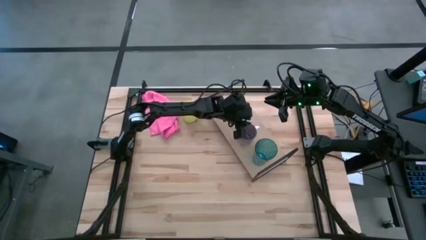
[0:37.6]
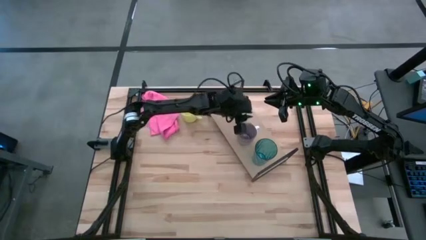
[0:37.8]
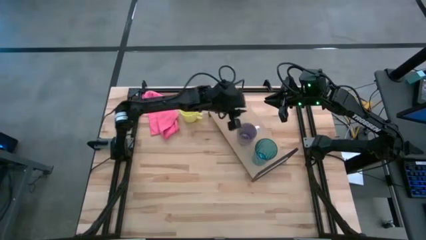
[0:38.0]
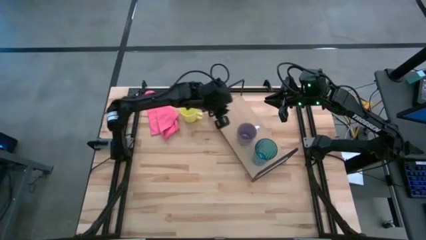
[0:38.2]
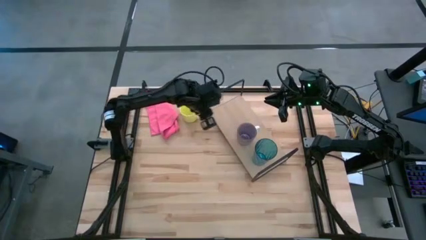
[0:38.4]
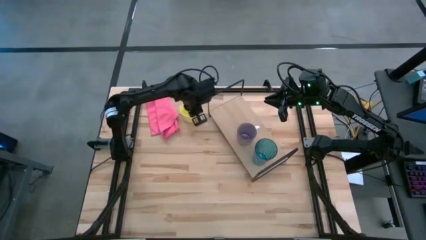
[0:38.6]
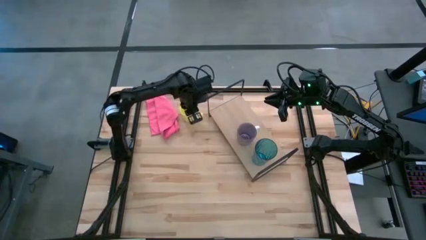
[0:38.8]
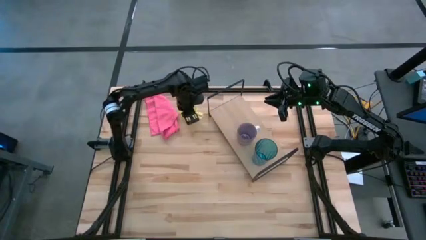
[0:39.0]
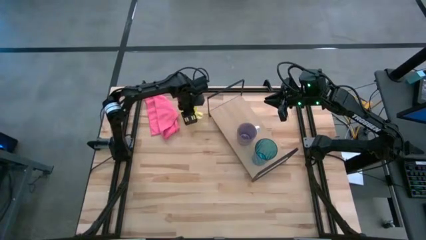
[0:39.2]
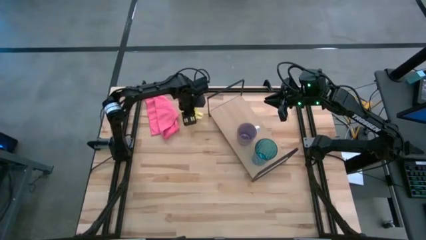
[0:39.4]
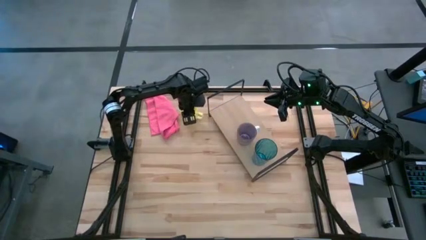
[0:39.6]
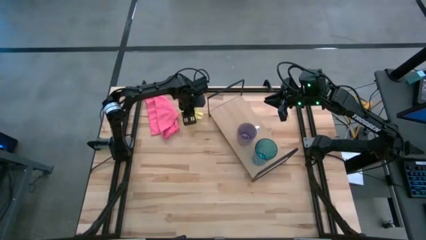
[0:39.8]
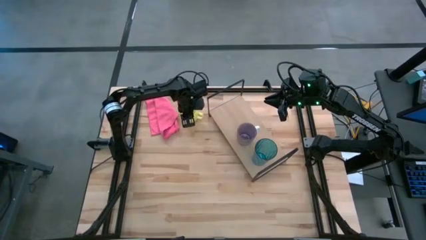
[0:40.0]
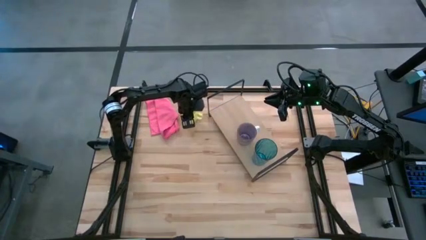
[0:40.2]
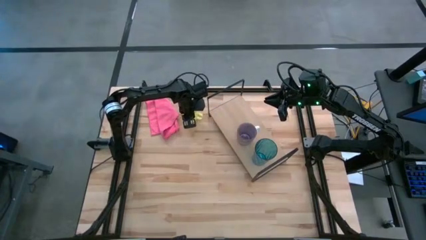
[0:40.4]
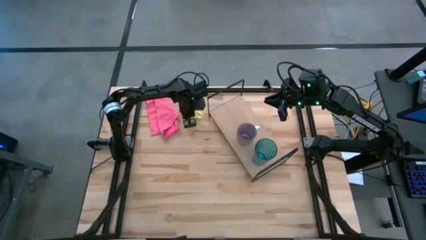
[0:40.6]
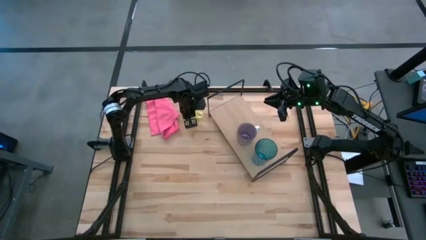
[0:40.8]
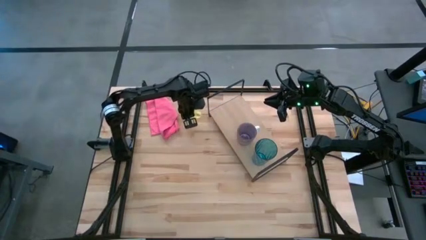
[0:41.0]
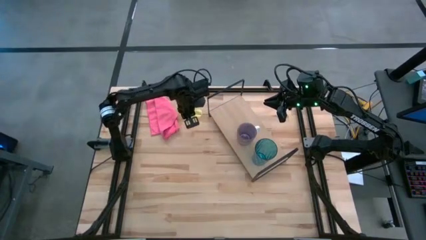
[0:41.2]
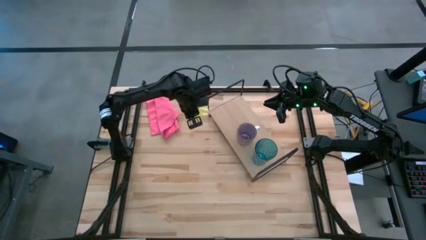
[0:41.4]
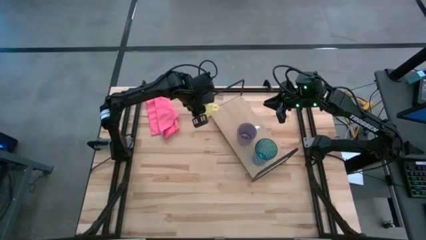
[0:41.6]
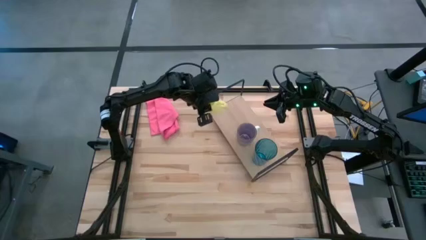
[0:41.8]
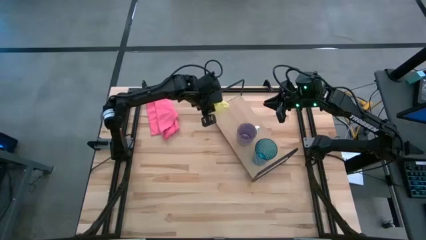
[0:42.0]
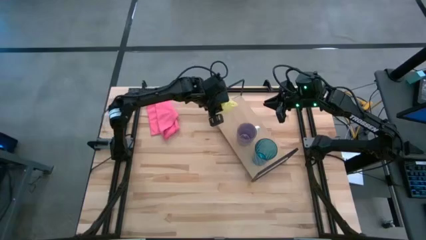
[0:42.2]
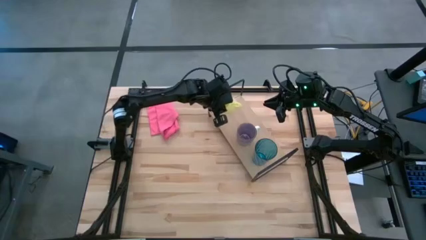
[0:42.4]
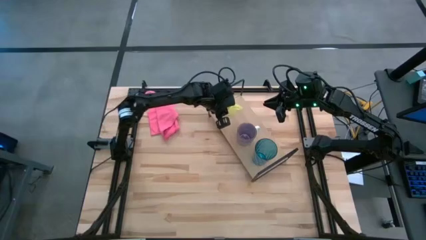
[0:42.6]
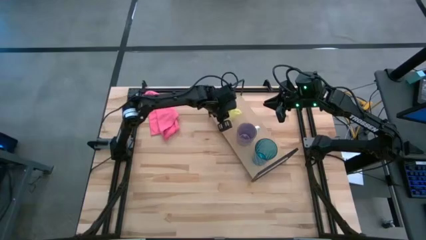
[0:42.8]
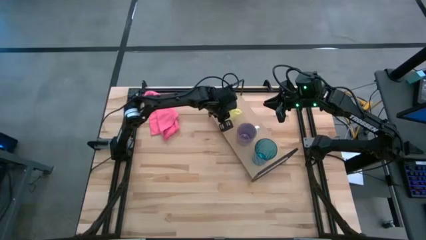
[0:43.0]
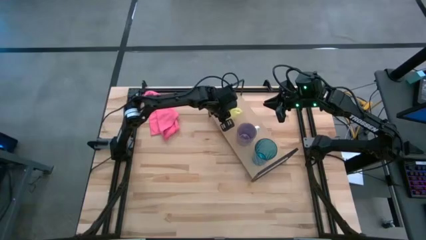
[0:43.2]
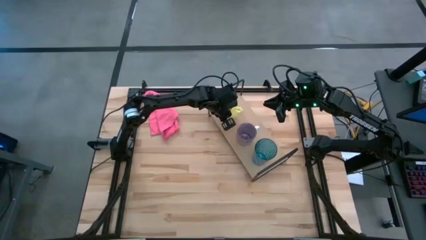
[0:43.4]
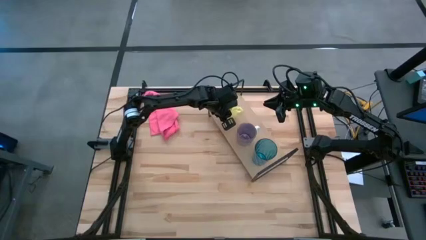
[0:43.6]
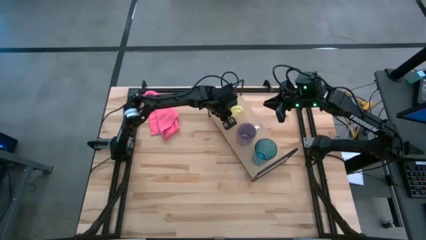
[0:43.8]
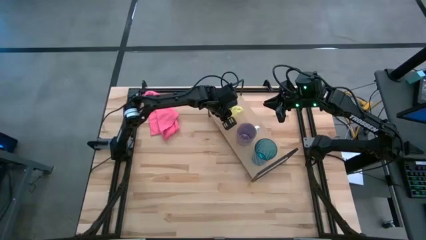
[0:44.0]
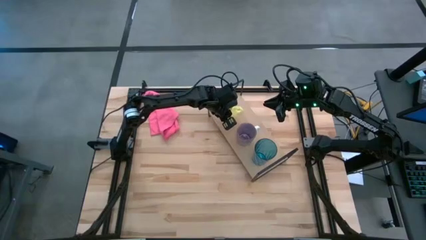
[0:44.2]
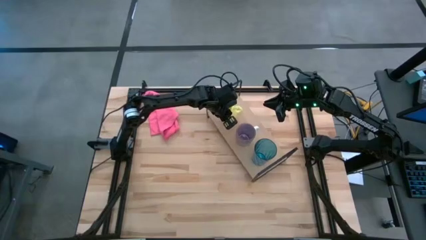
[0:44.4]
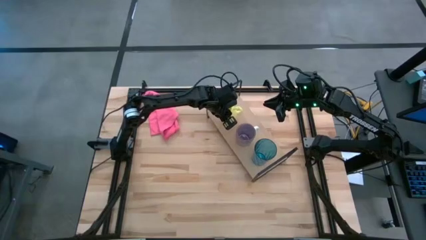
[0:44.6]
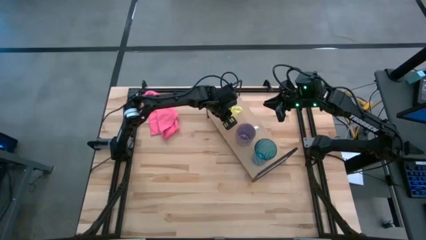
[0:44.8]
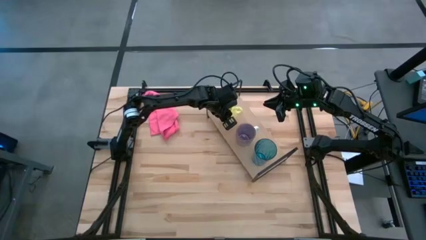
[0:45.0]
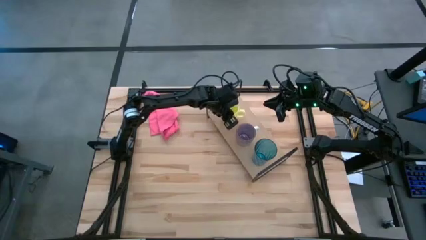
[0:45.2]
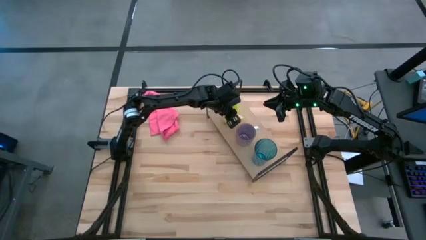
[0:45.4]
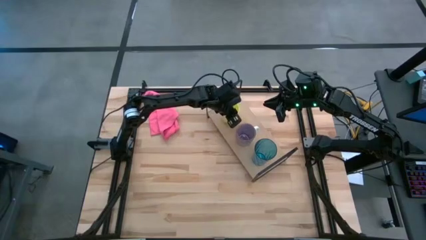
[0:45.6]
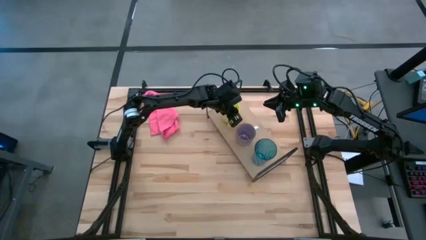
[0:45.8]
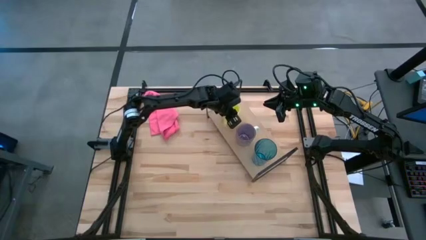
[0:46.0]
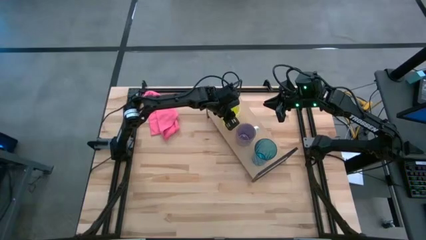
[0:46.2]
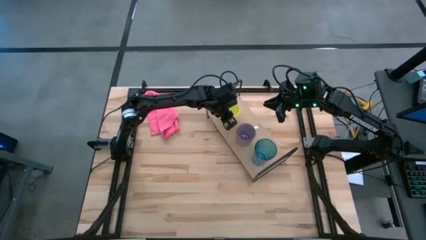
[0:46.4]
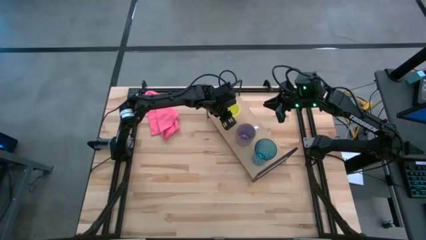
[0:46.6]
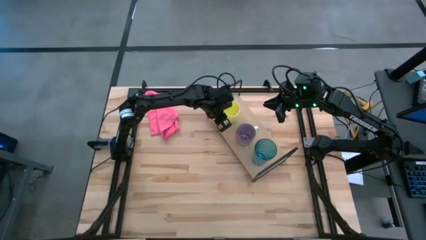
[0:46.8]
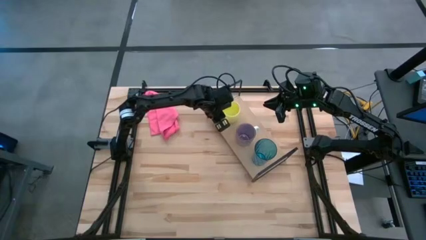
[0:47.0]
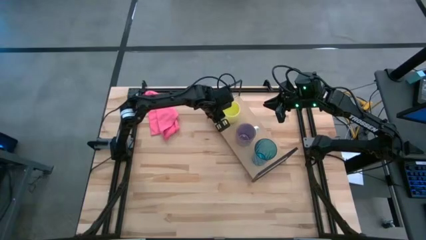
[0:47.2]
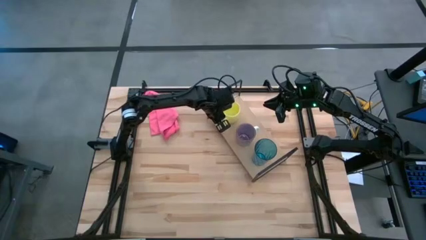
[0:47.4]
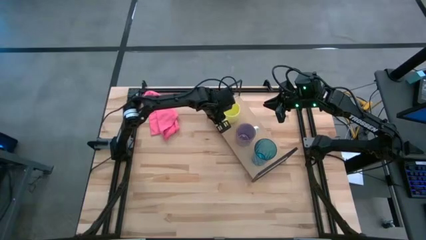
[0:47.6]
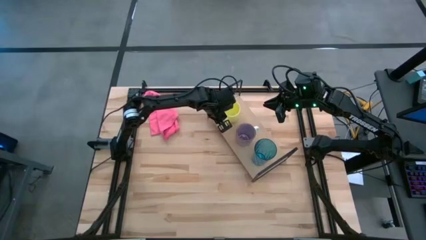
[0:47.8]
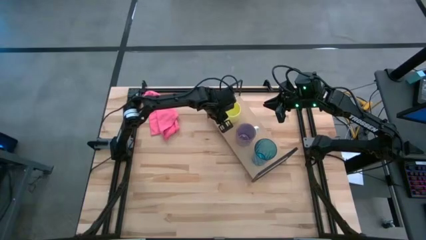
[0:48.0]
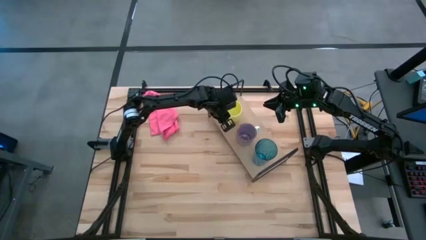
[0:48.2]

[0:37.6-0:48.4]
Task: Stack small to large cups/mugs on shelf
Put the yellow mug on the shelf
